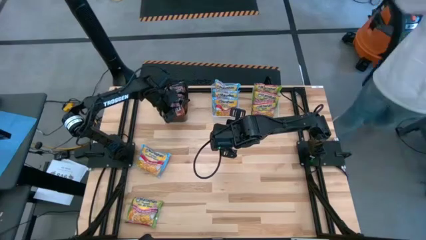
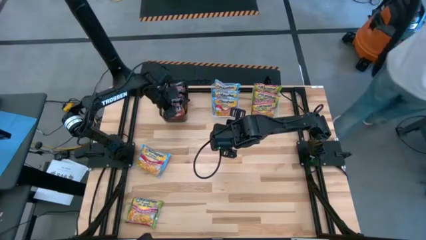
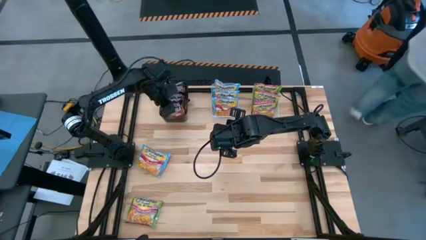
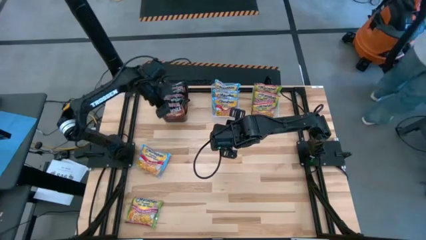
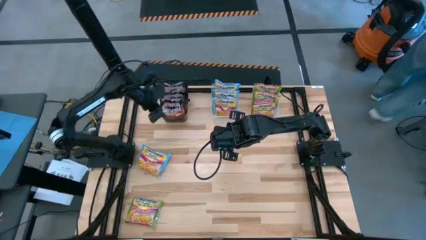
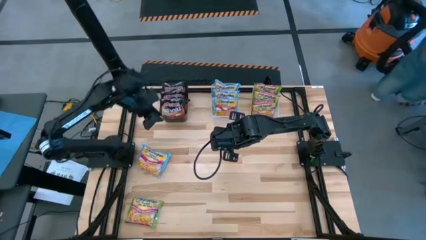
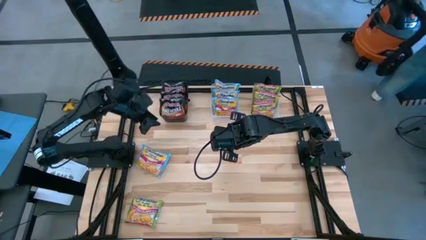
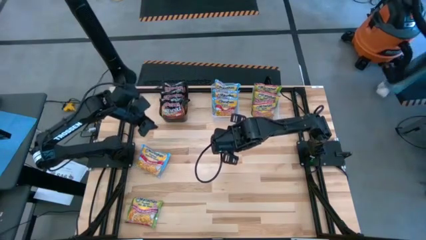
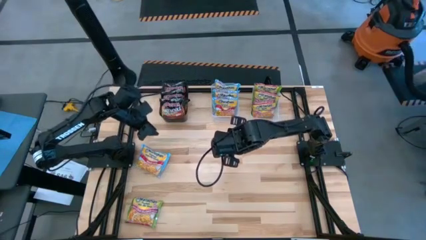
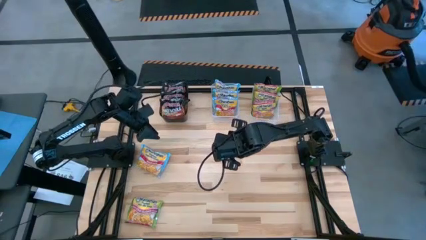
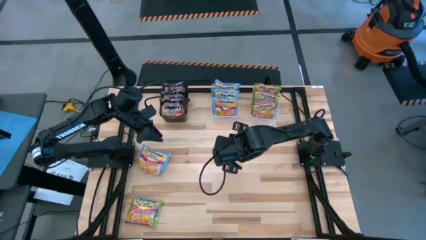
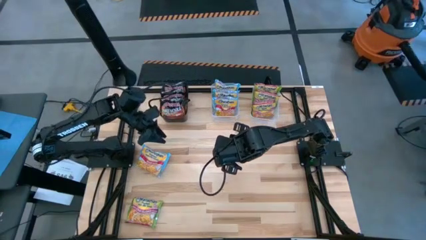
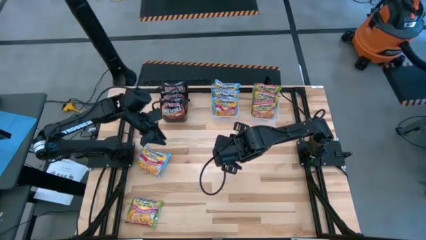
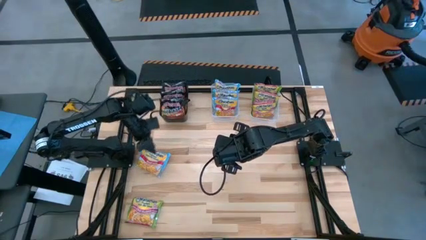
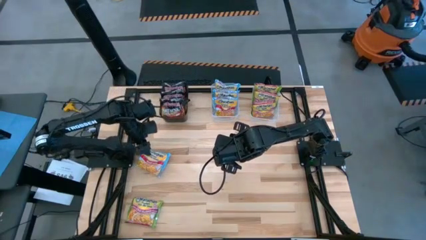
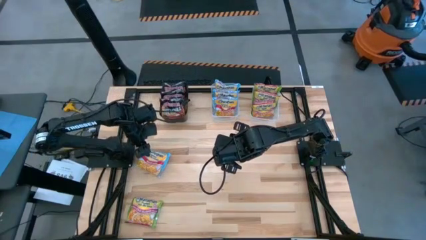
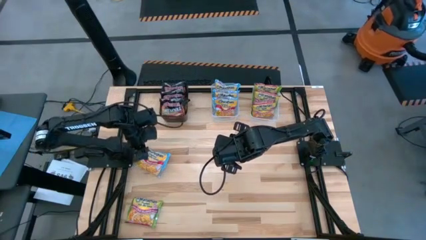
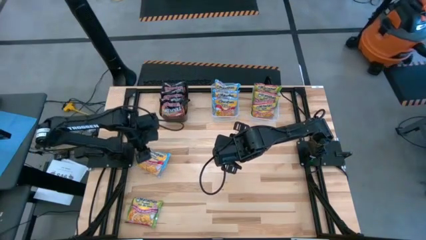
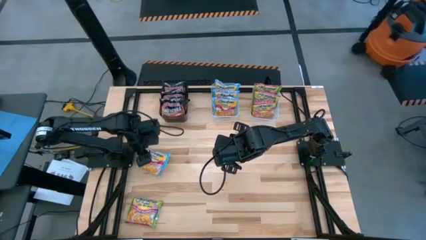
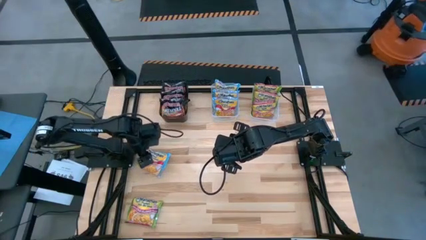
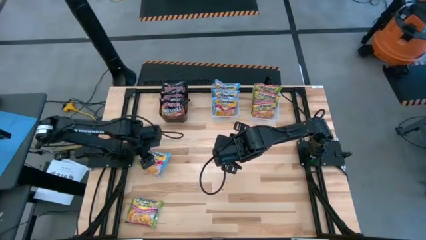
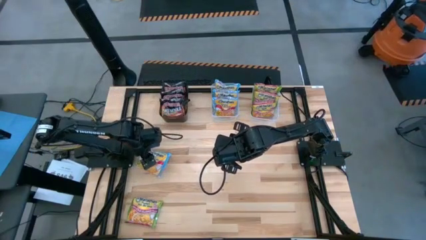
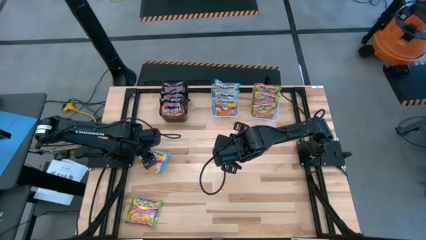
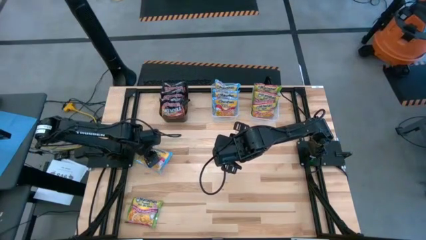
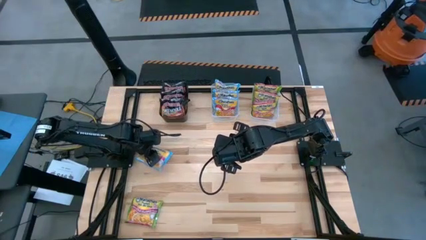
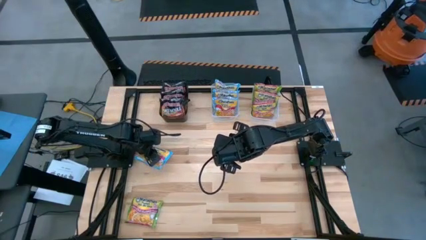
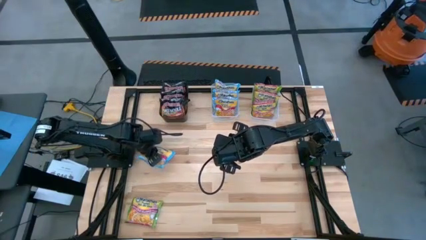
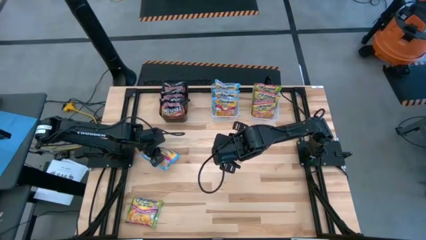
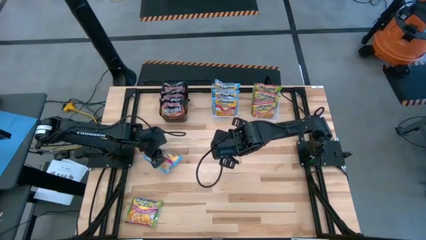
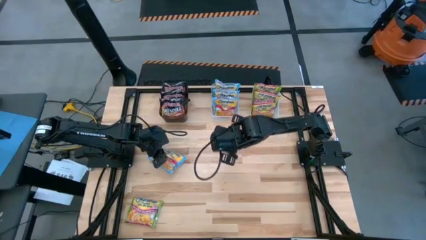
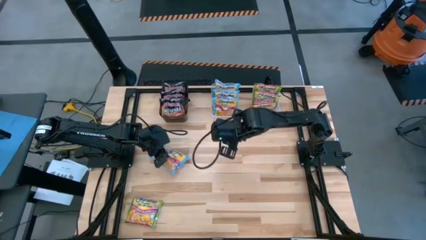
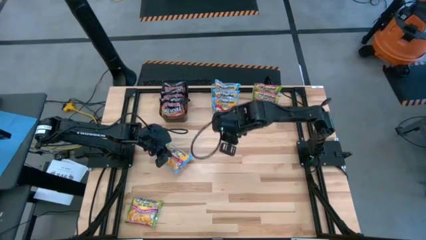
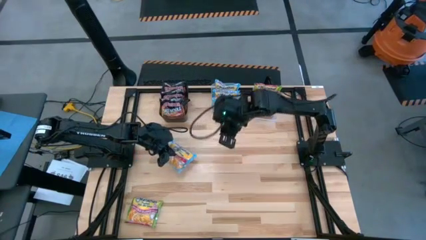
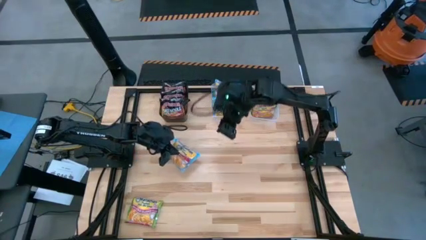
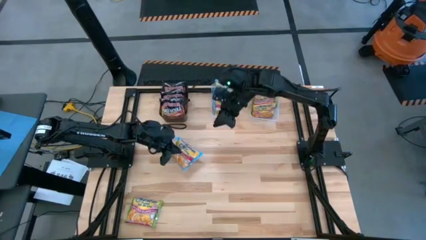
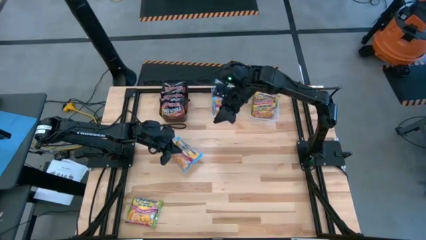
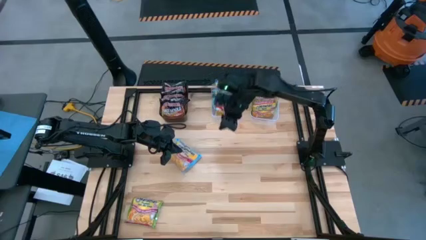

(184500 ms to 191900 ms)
Task: Sort Maruchan noodles
Put the blue noodle pack into the left transparent bin

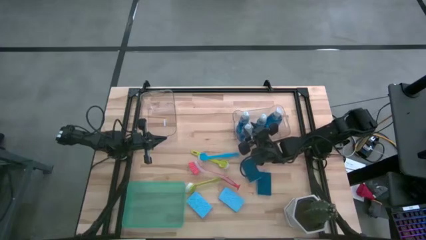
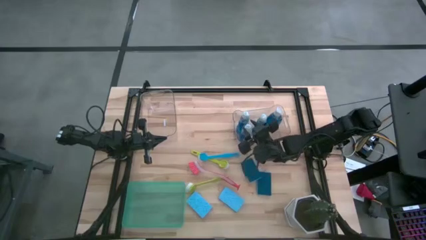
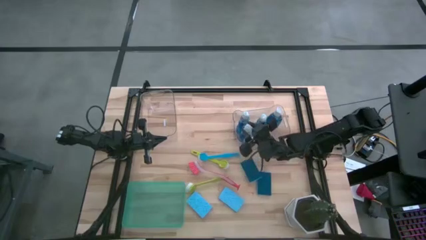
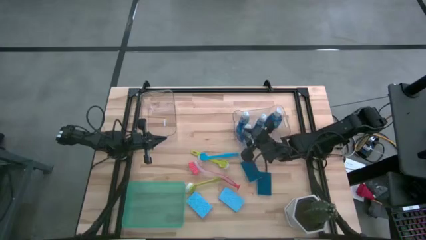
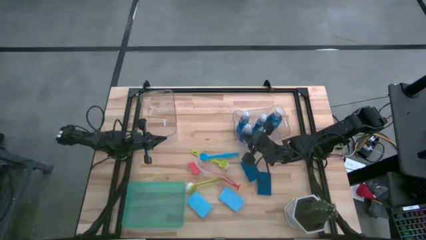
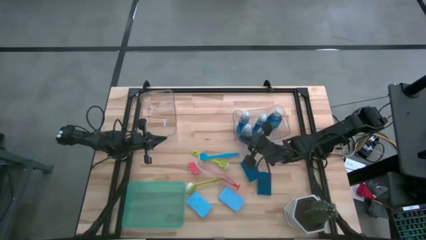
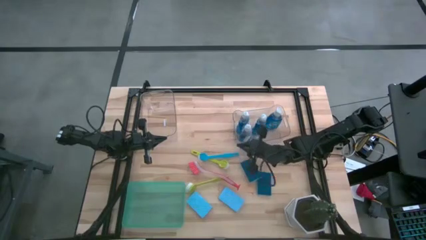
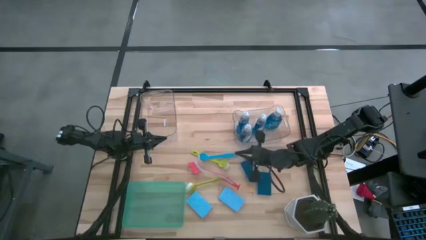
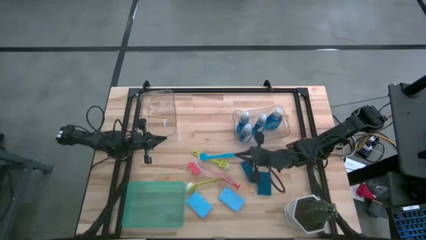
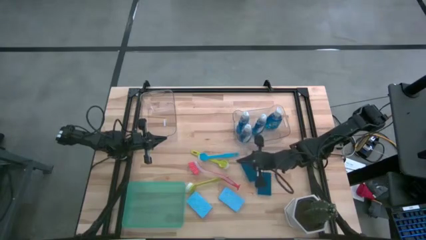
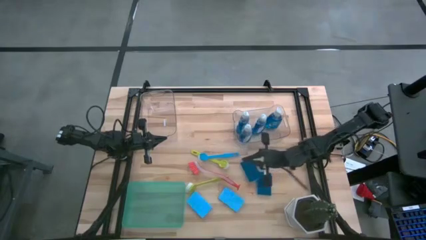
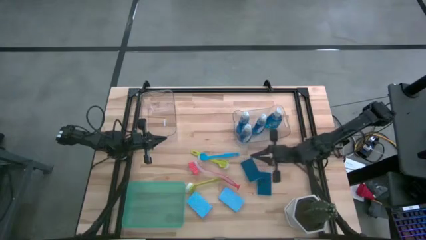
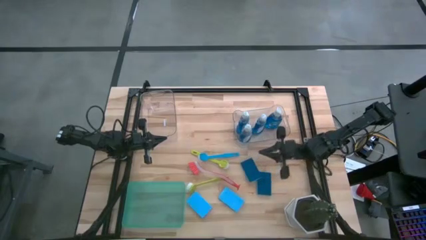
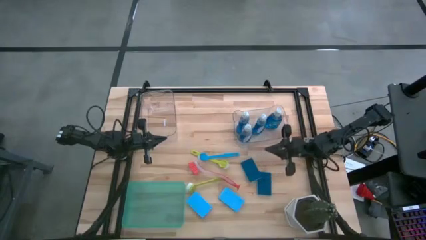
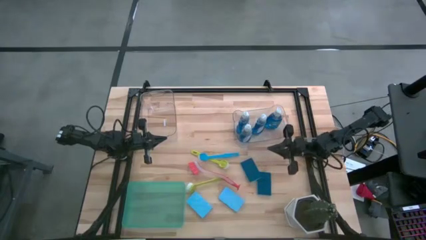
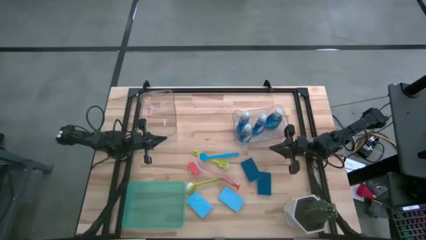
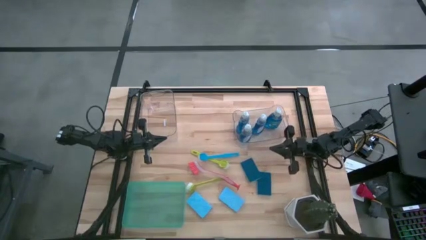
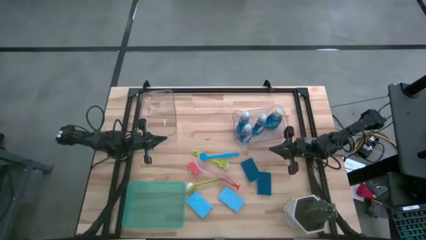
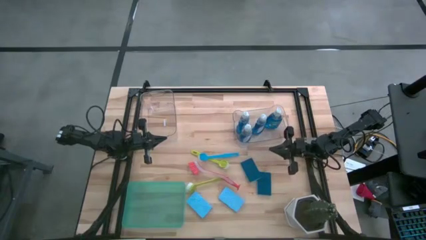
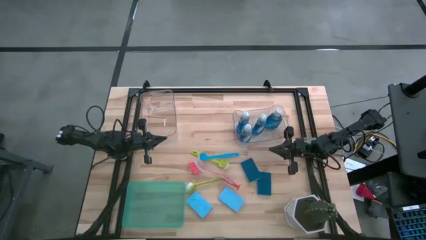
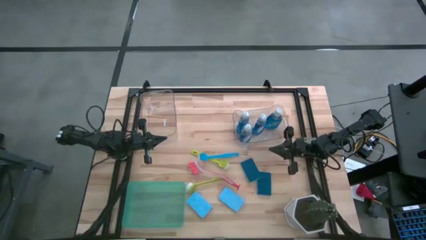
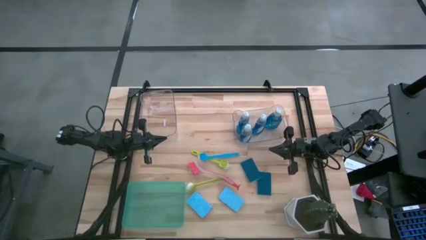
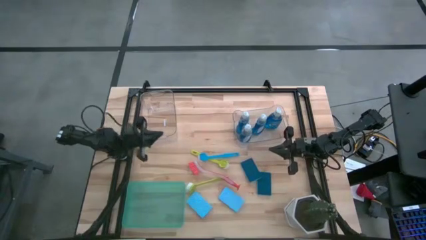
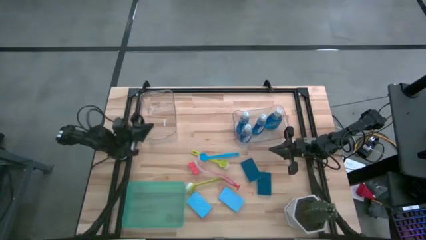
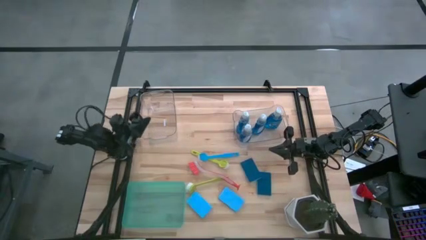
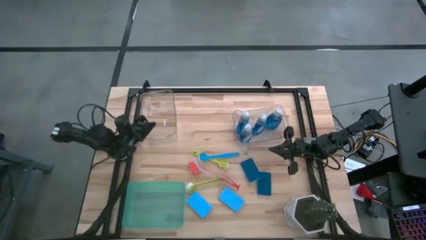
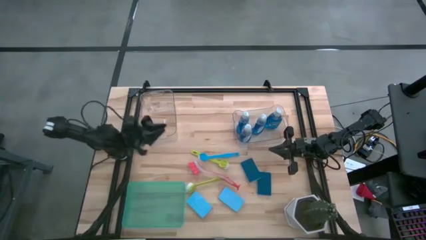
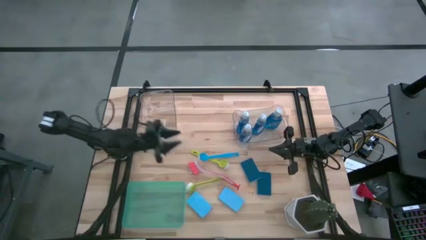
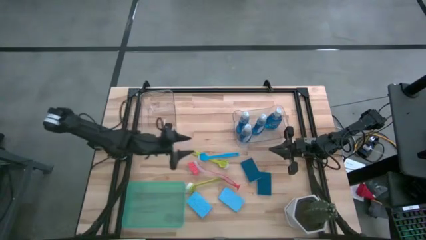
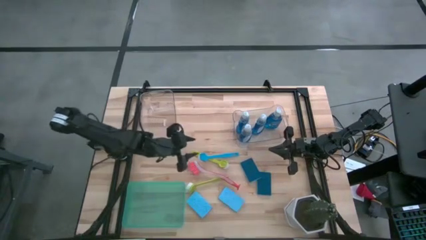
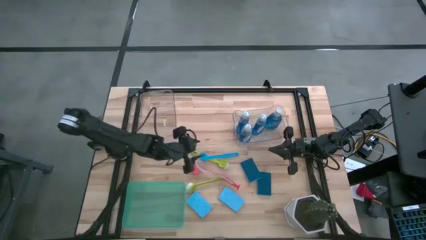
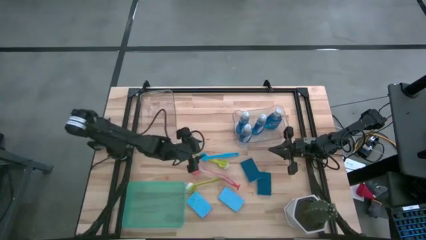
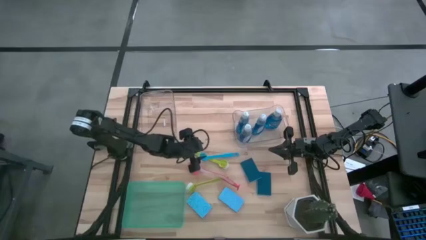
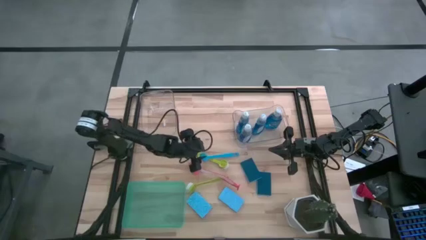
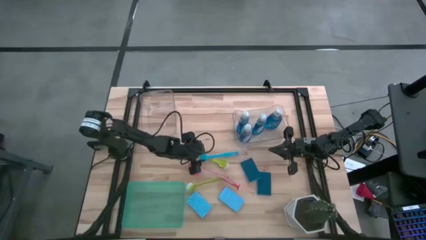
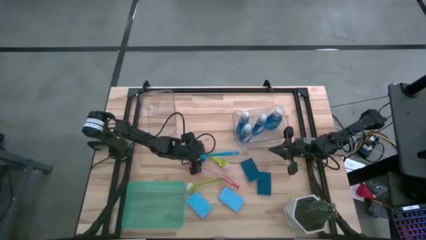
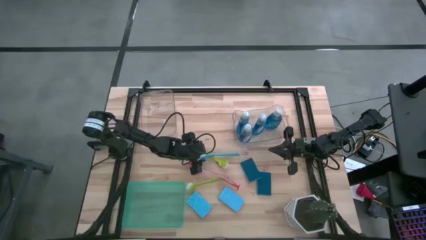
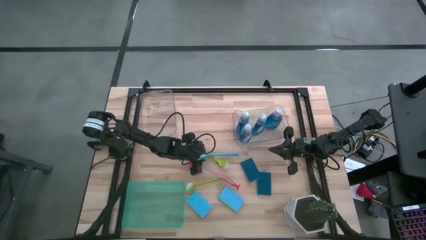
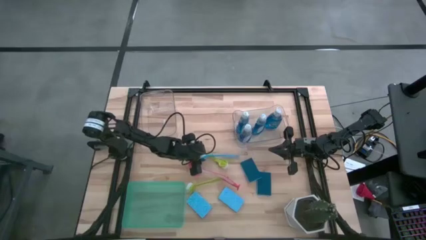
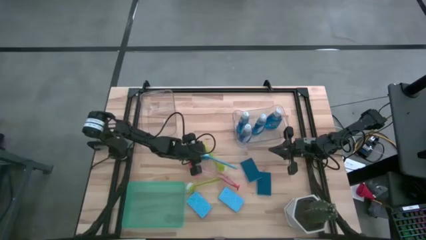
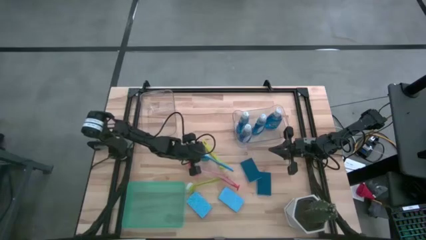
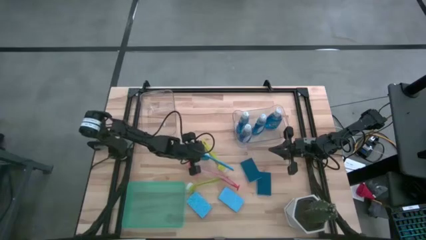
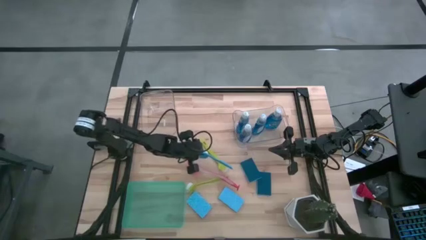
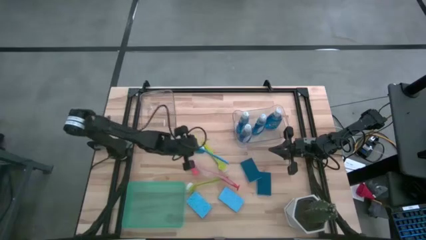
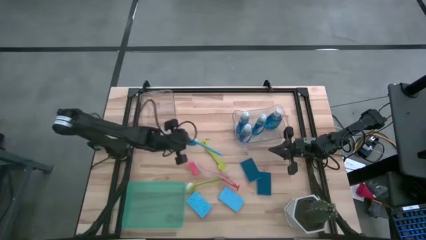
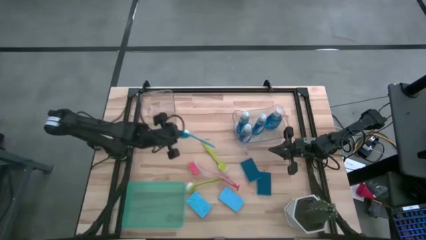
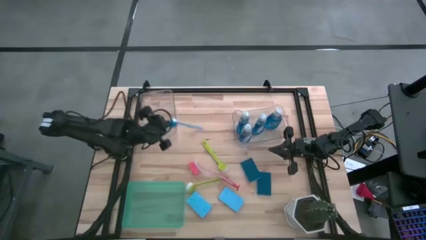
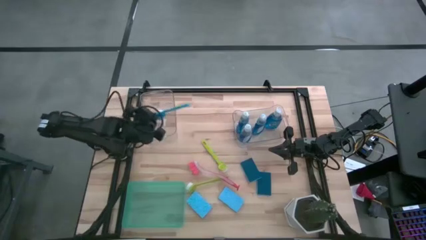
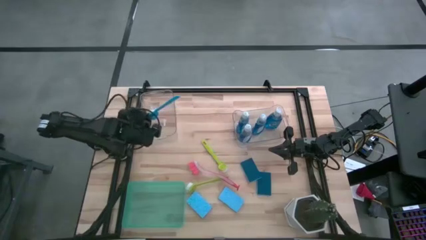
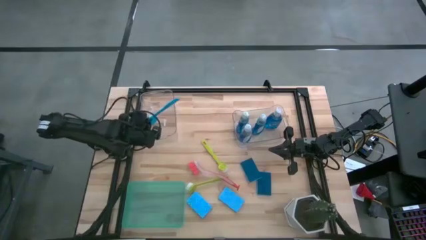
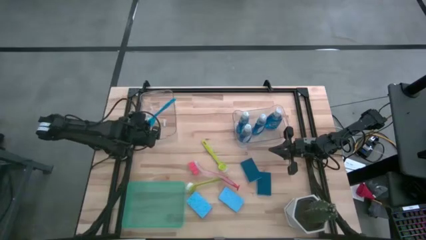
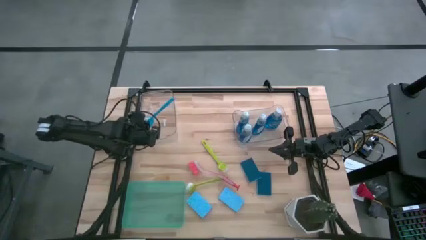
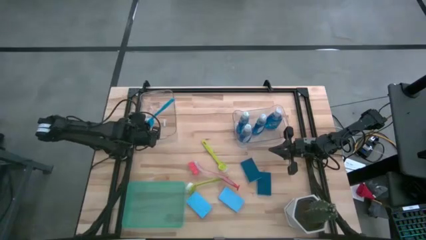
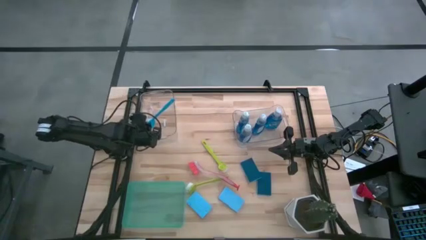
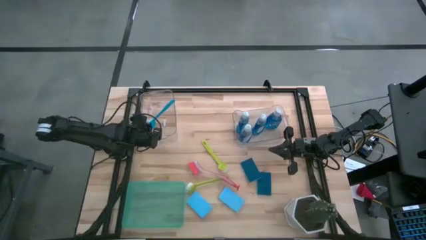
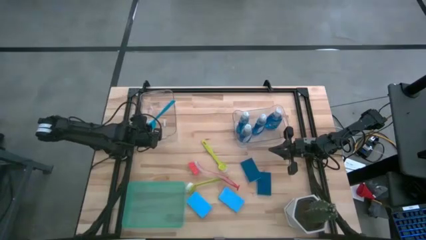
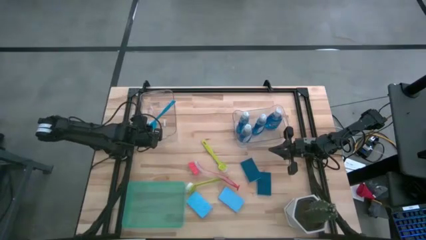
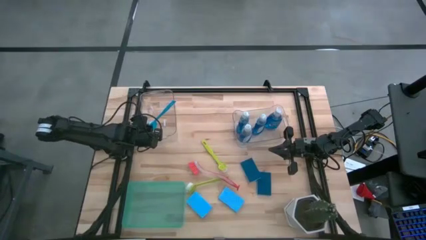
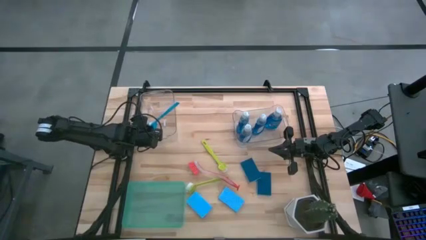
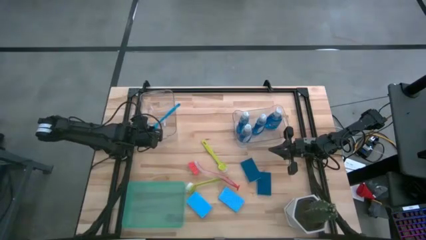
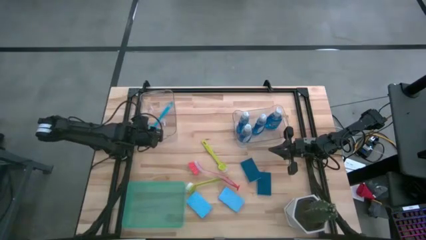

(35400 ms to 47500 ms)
Task: Pick & Place Kitchen Sink Supplies
Put the blue dish brush into the left transparent bin
